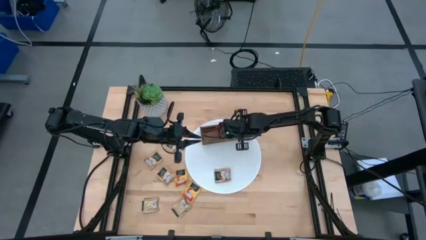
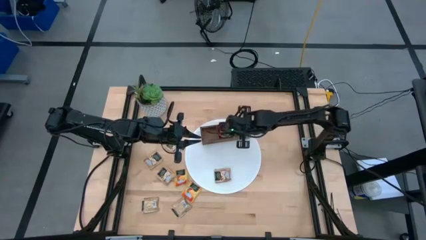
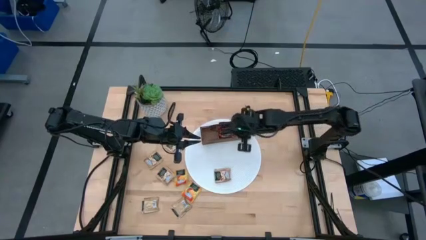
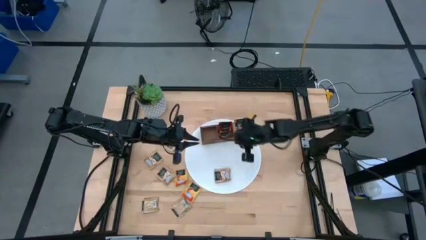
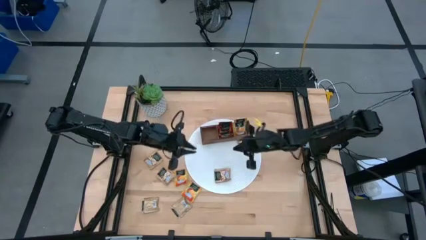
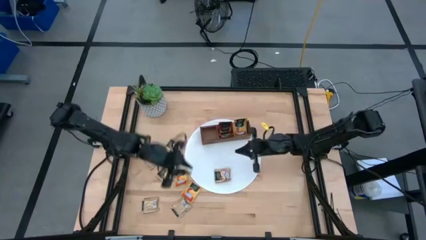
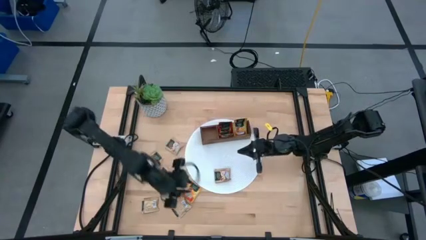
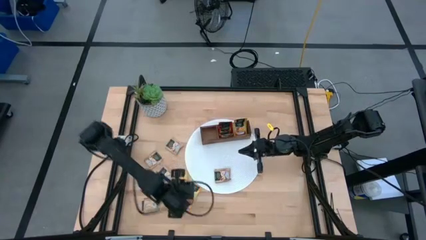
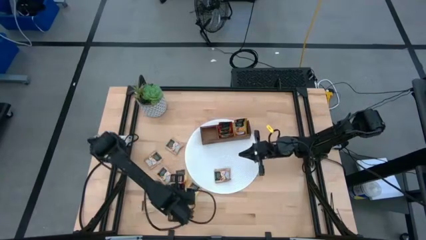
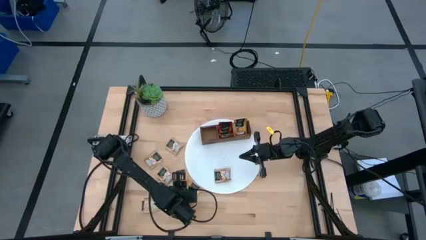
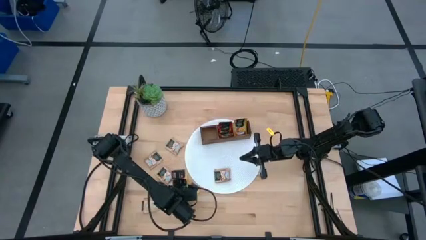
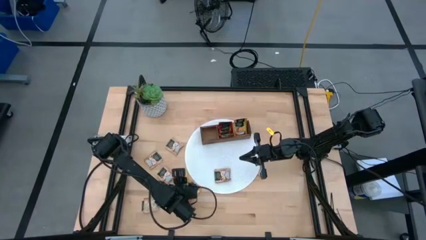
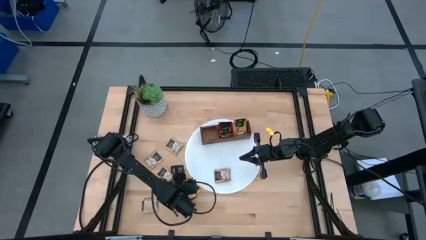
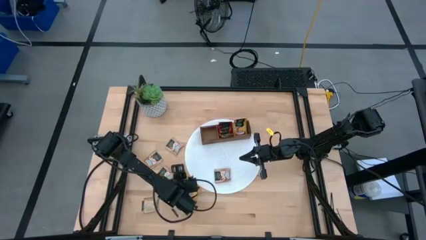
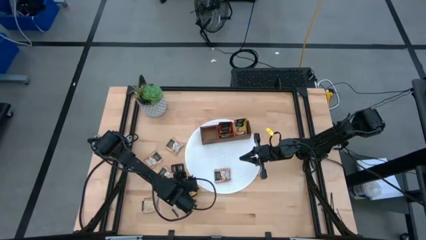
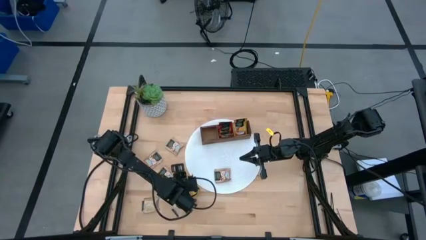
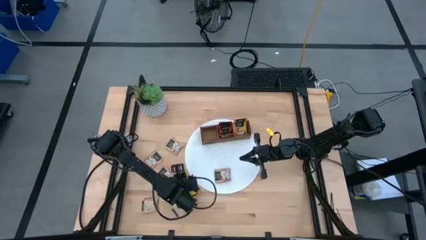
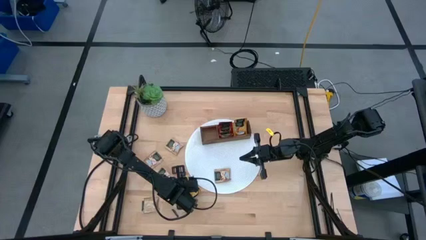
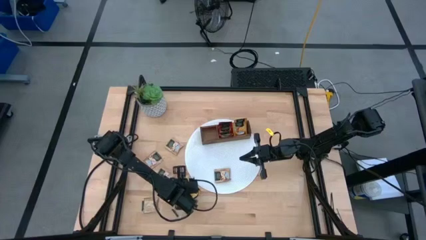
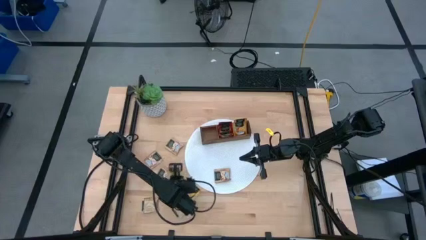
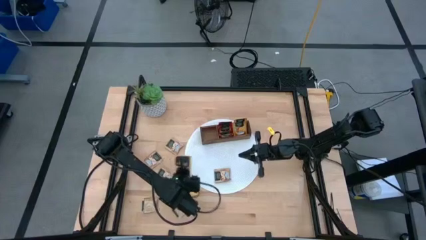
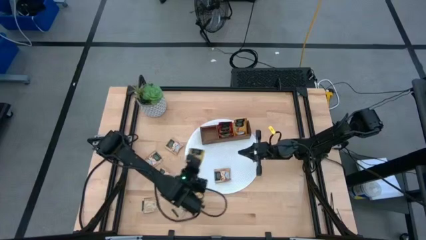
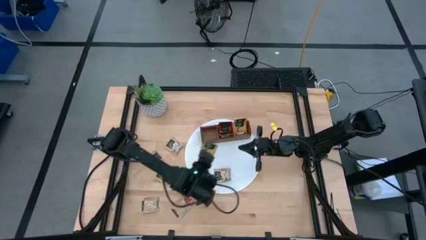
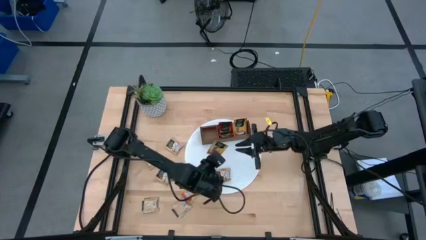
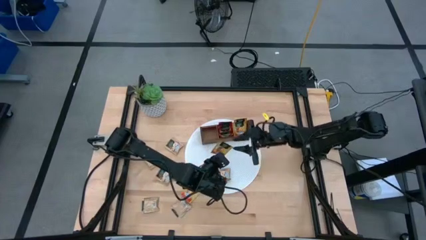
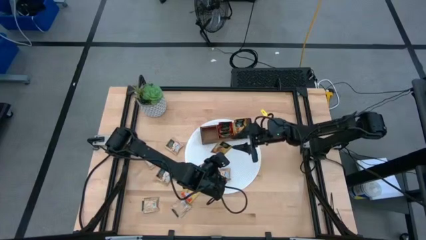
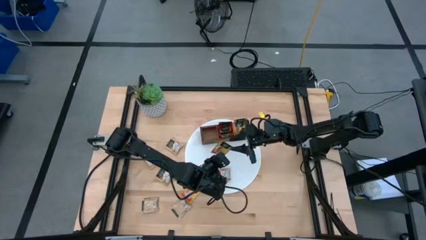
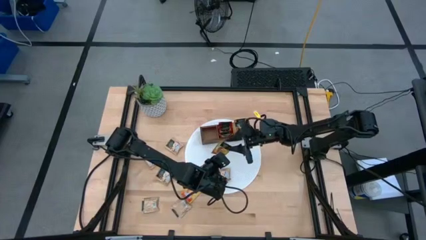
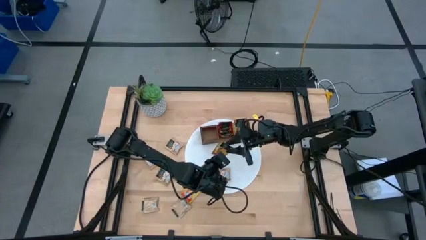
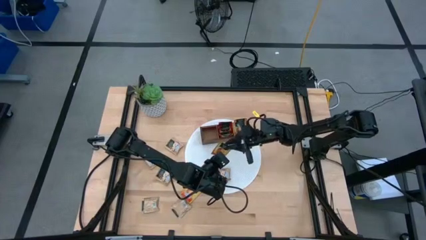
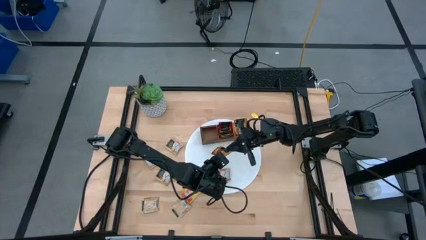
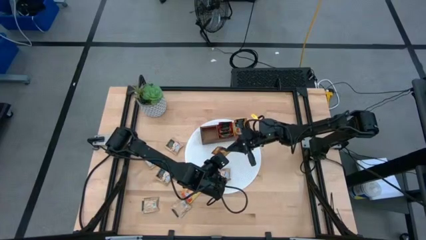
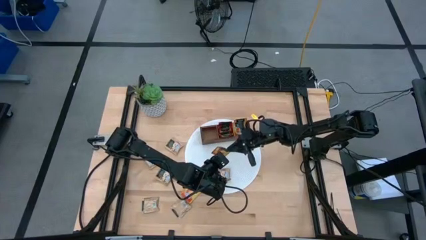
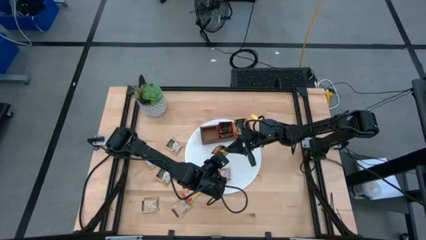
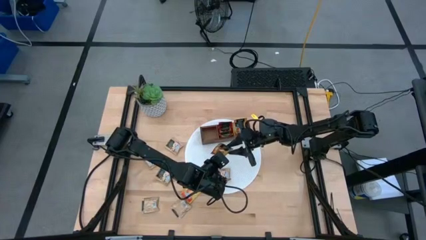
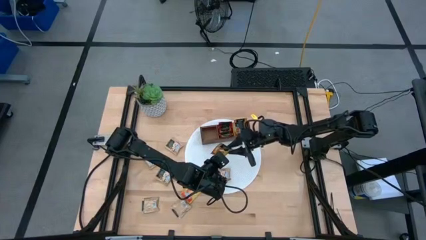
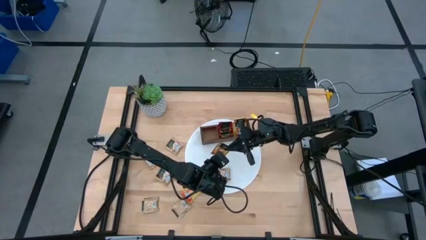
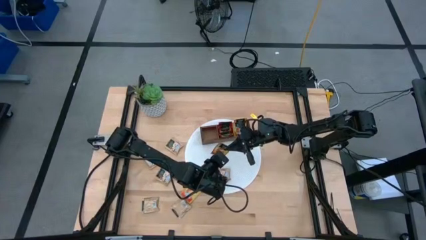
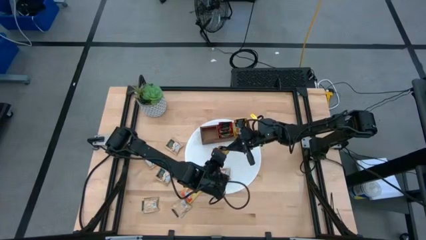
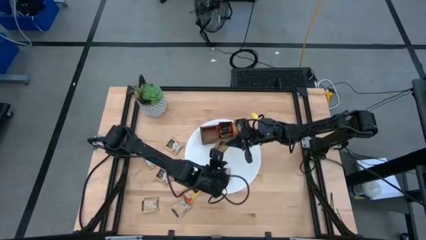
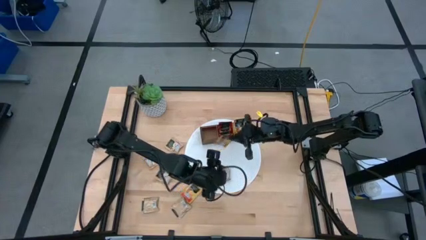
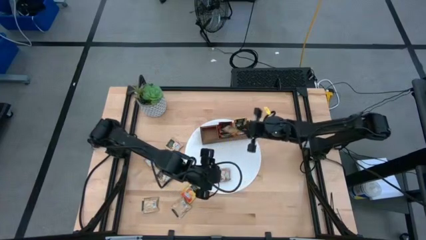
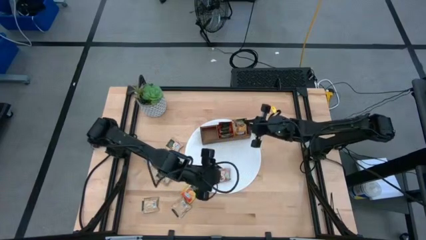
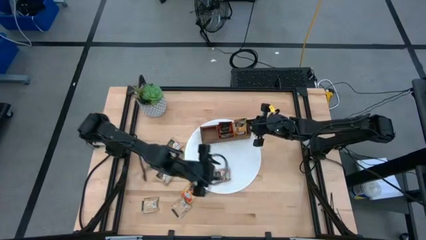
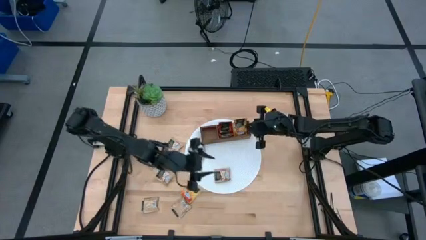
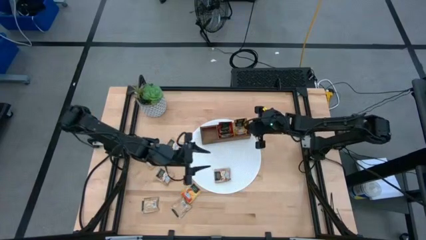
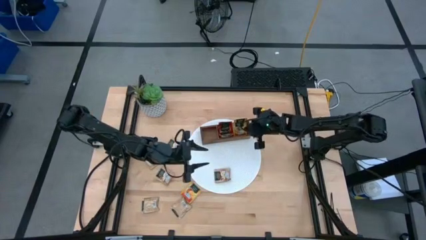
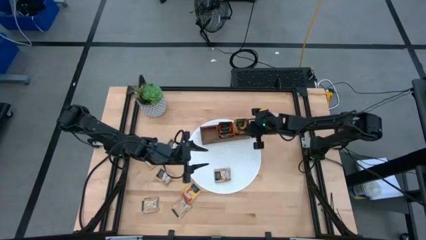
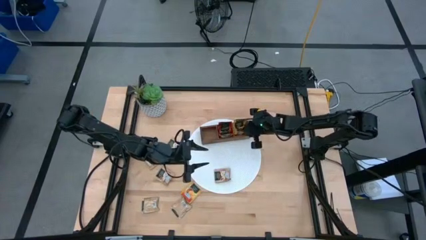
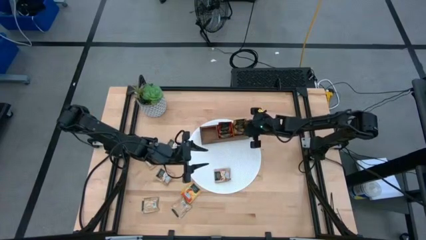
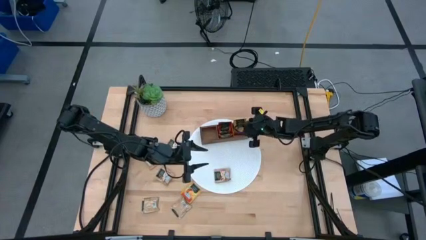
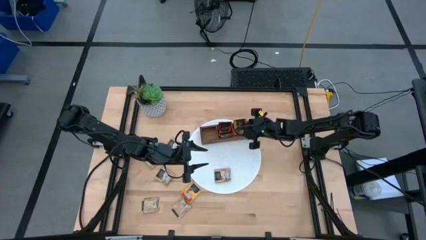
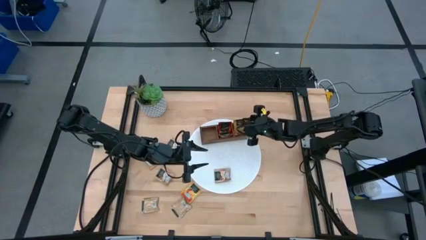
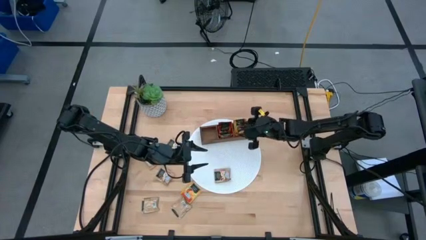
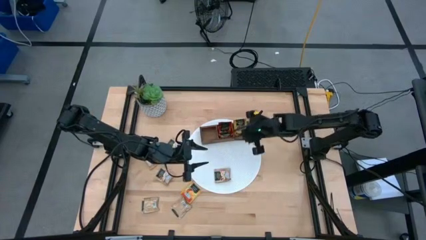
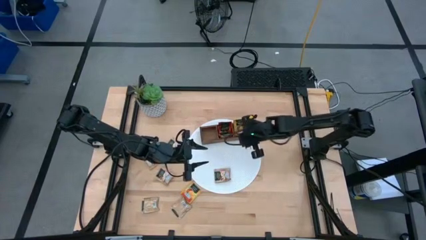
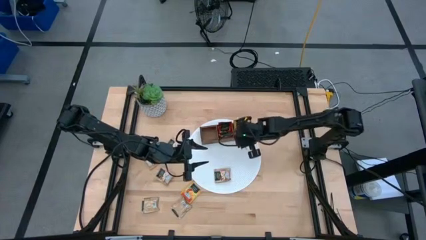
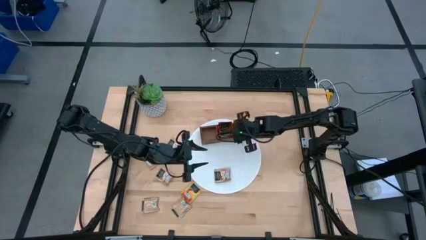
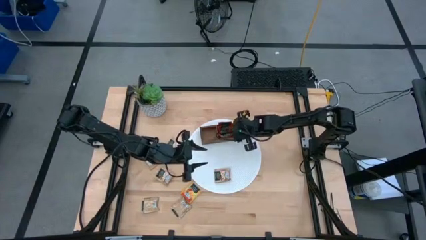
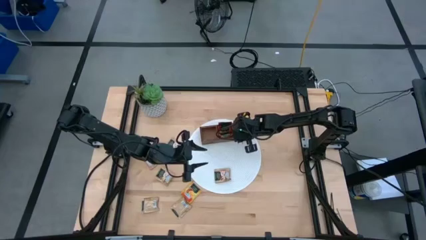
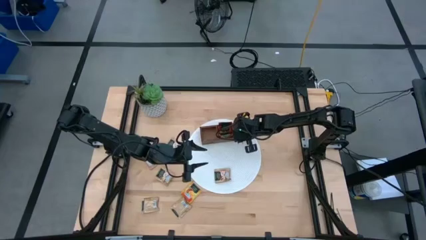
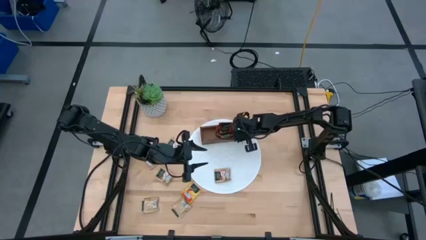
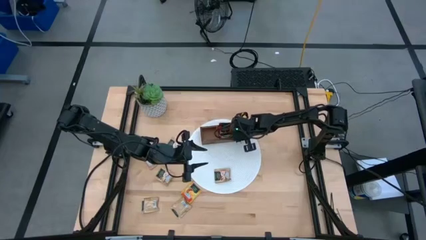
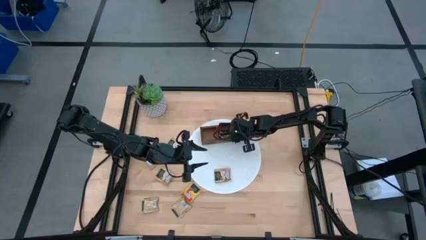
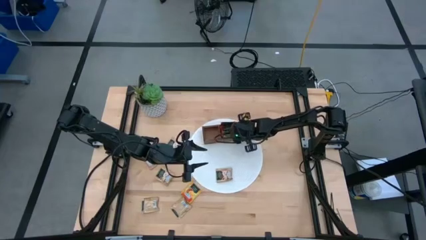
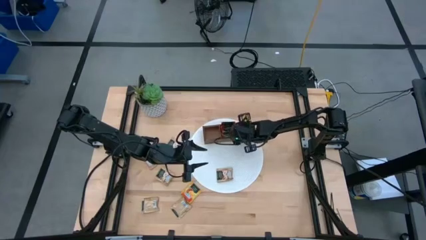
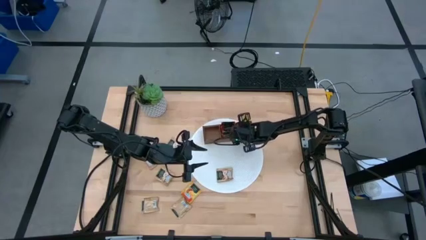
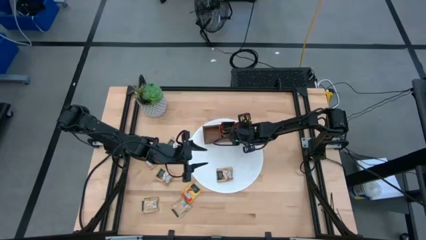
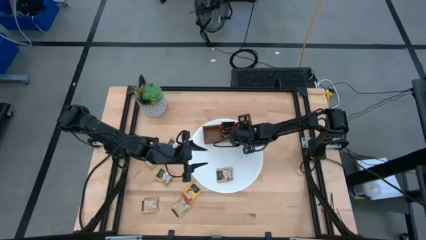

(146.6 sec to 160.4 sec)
Task: Pick & Place Tea
Put the yellow tea bag into the right section of the wooden organizer

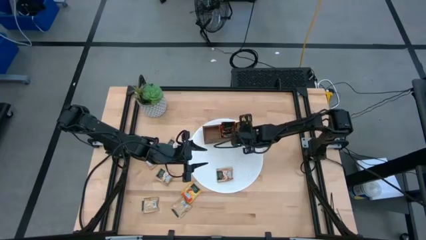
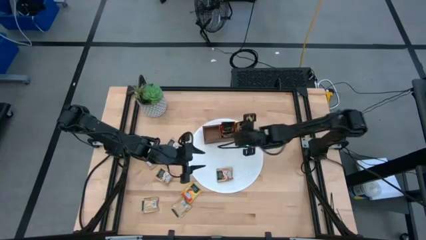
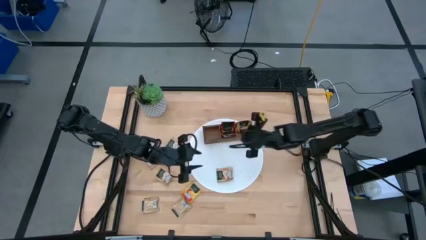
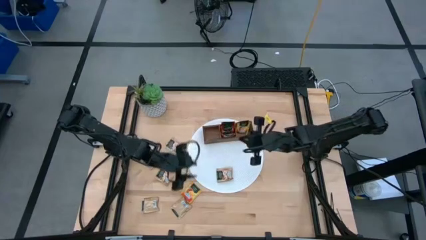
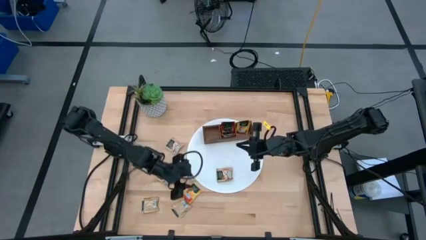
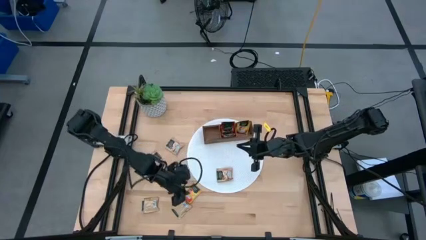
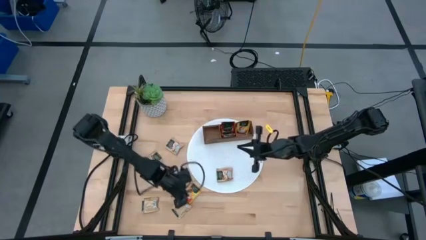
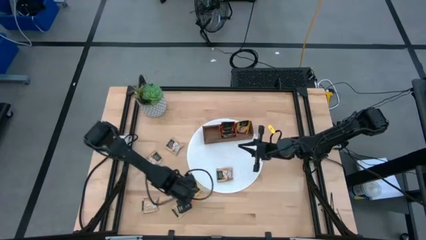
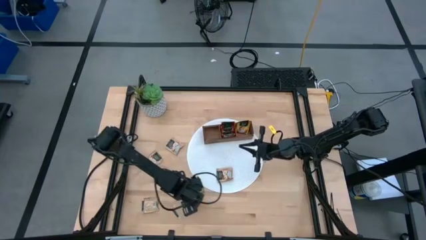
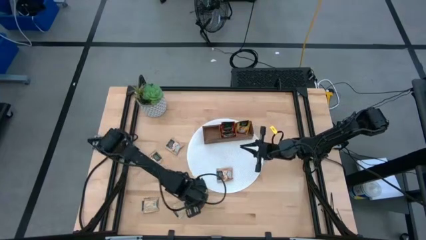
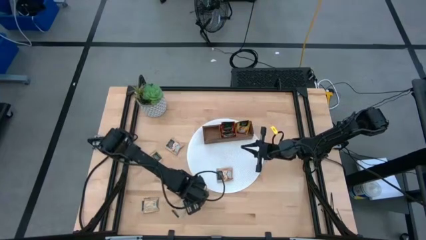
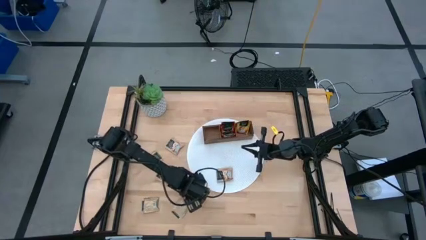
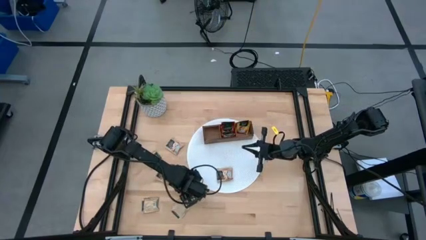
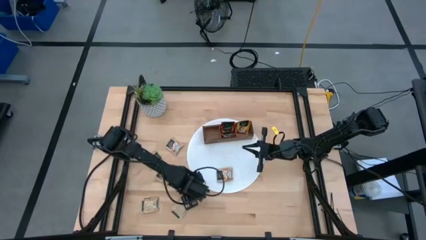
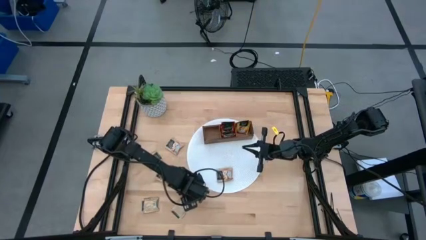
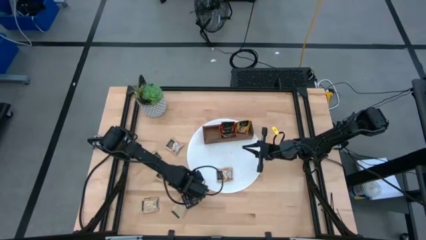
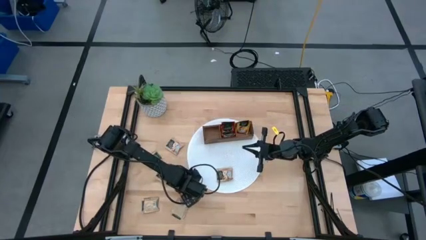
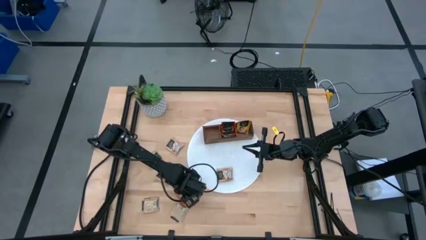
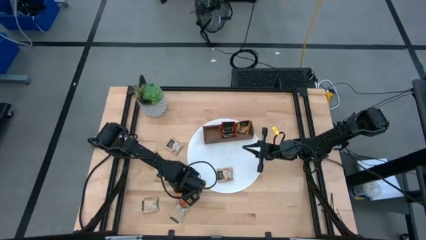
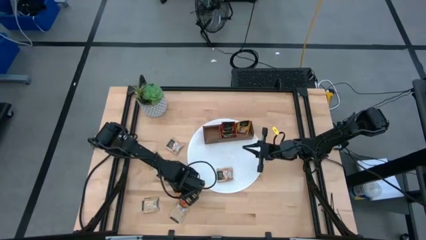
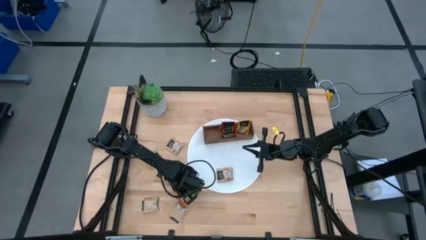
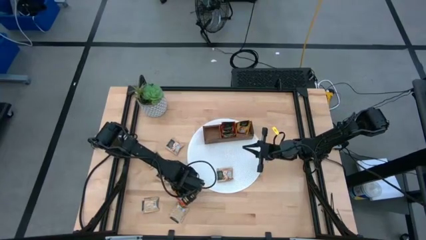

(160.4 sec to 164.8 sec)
Put the yellow tea bag into the right section of the wooden organizer
